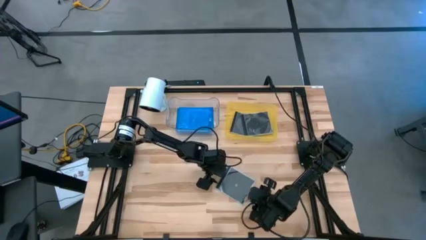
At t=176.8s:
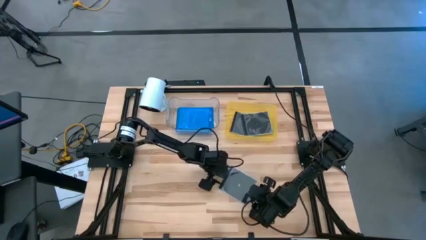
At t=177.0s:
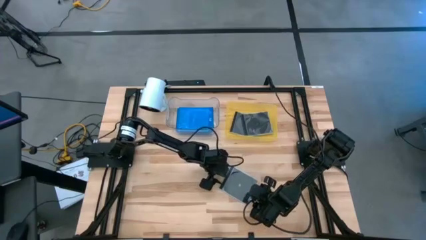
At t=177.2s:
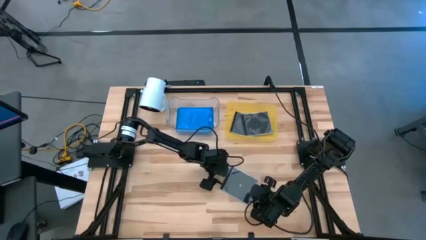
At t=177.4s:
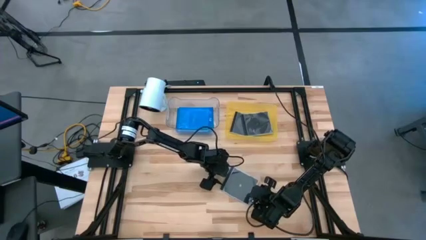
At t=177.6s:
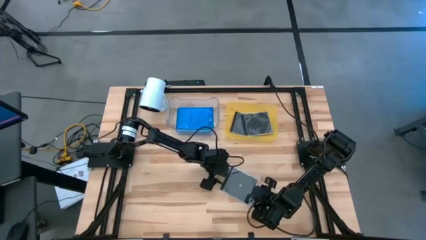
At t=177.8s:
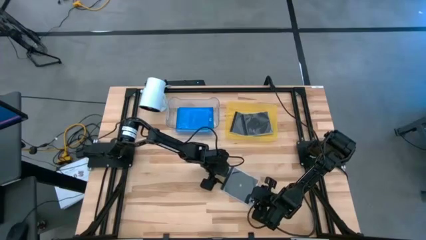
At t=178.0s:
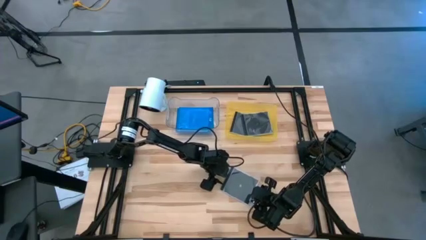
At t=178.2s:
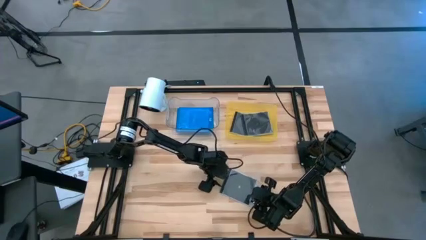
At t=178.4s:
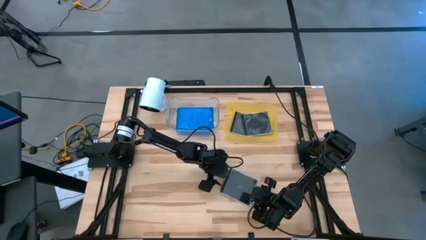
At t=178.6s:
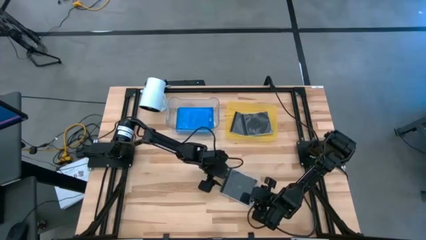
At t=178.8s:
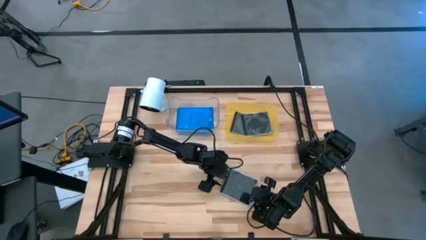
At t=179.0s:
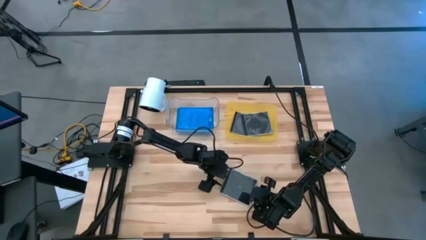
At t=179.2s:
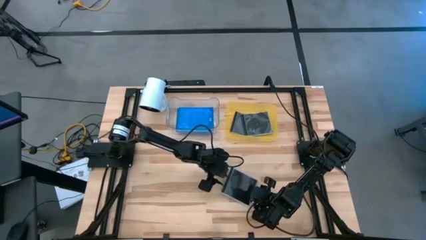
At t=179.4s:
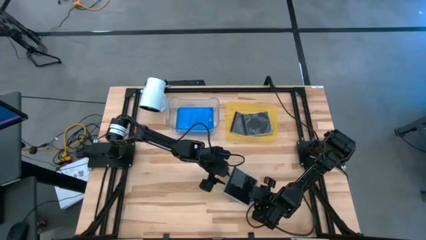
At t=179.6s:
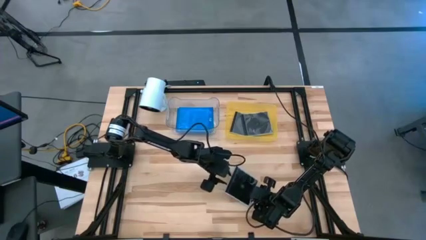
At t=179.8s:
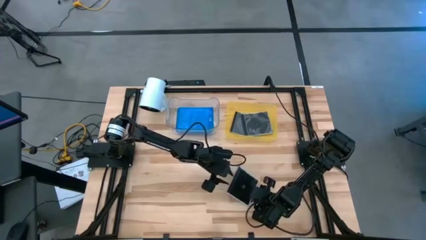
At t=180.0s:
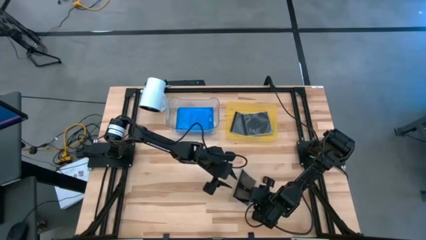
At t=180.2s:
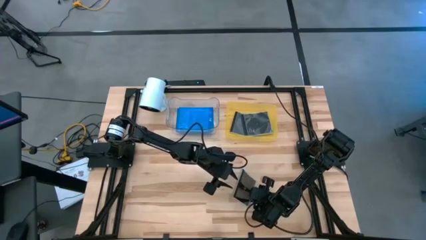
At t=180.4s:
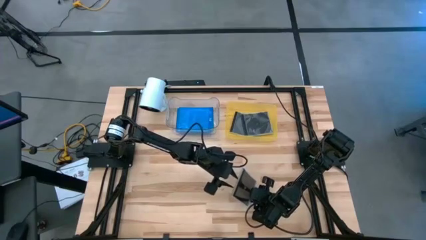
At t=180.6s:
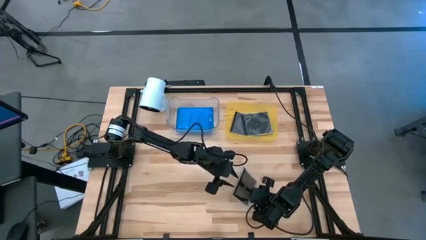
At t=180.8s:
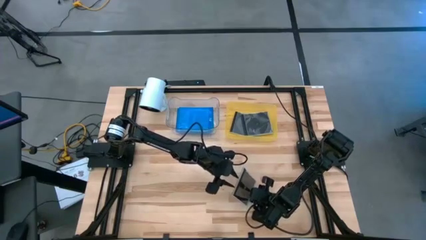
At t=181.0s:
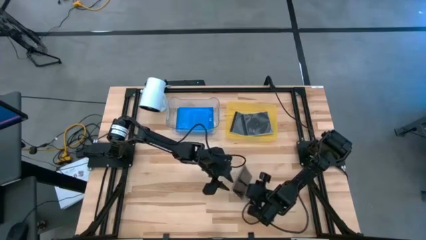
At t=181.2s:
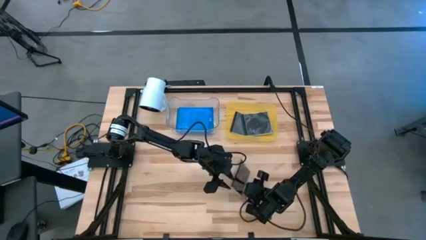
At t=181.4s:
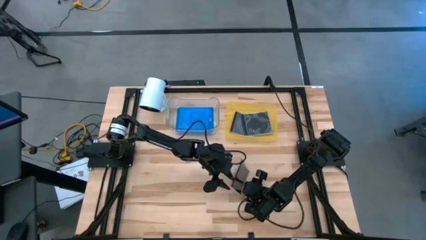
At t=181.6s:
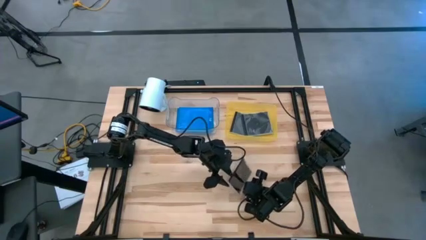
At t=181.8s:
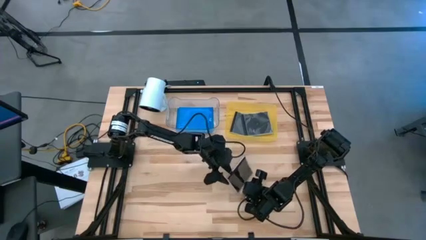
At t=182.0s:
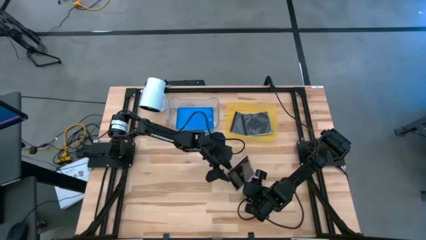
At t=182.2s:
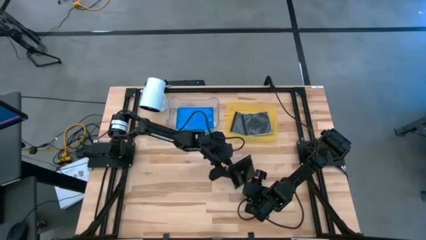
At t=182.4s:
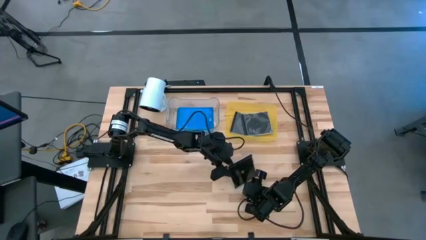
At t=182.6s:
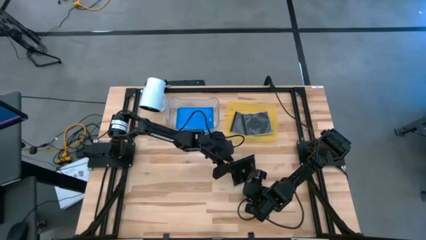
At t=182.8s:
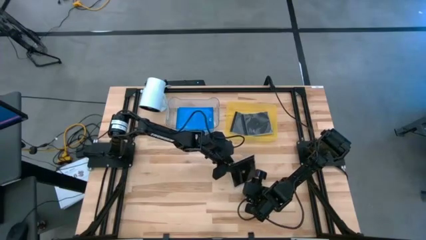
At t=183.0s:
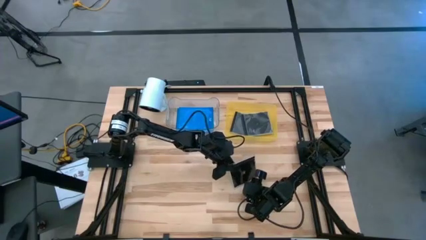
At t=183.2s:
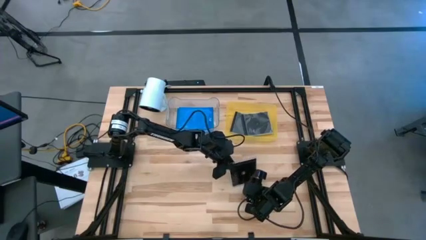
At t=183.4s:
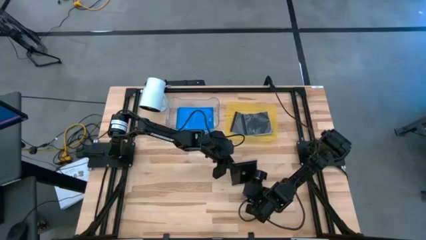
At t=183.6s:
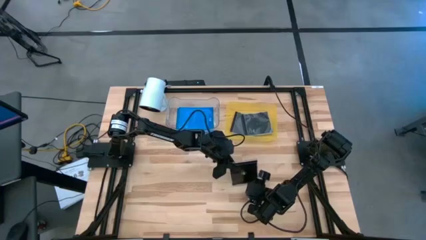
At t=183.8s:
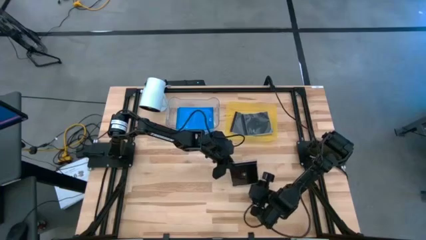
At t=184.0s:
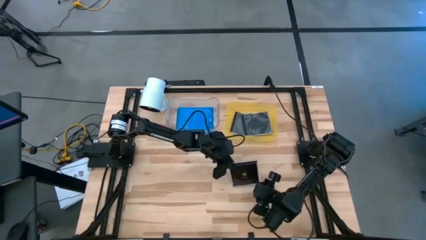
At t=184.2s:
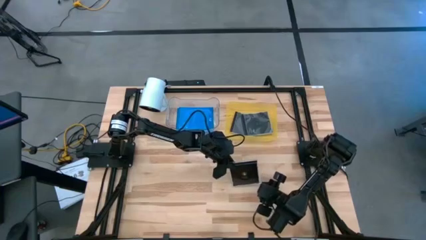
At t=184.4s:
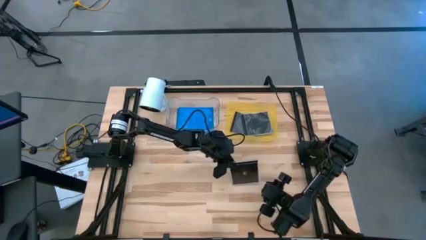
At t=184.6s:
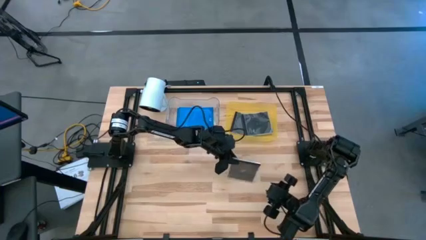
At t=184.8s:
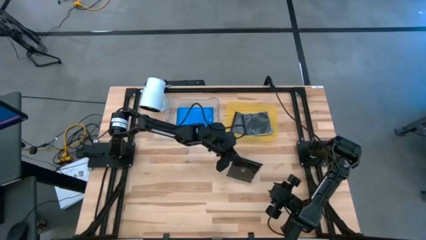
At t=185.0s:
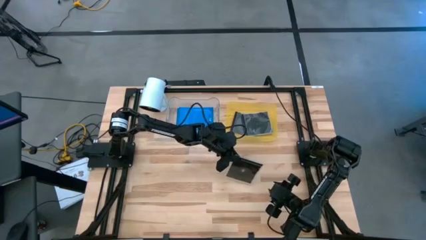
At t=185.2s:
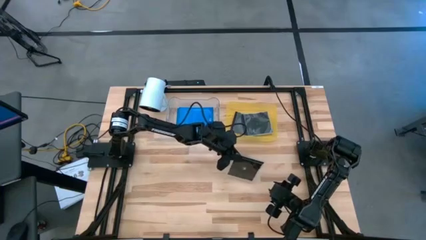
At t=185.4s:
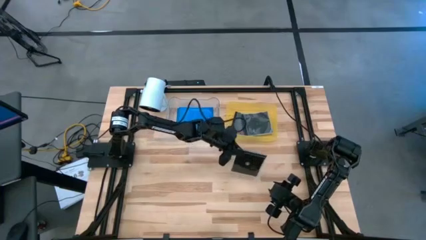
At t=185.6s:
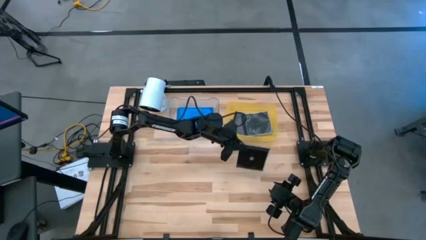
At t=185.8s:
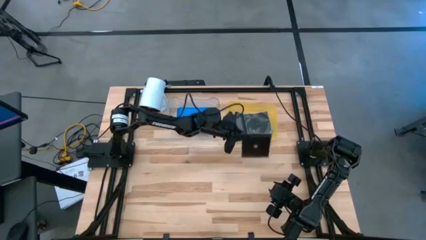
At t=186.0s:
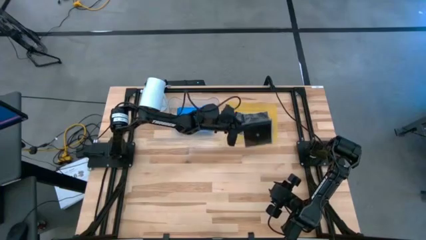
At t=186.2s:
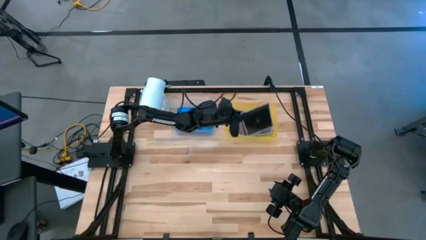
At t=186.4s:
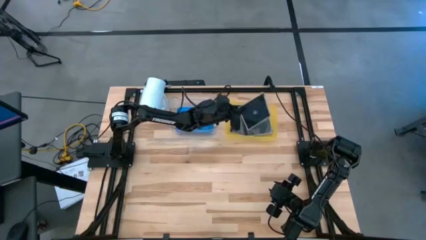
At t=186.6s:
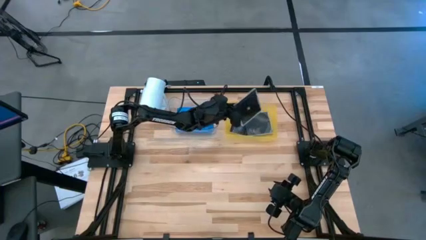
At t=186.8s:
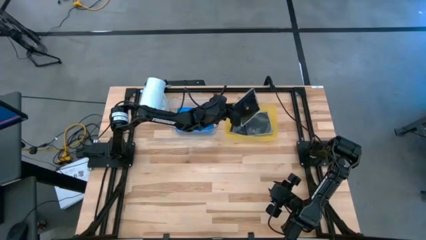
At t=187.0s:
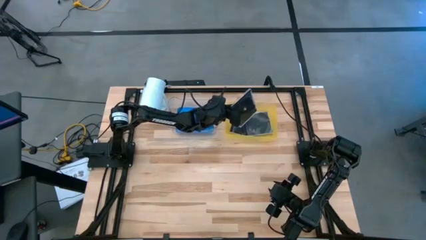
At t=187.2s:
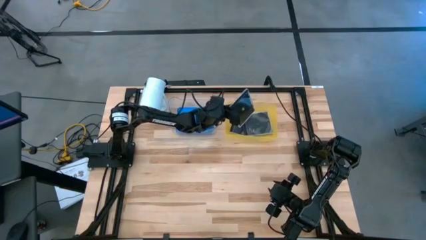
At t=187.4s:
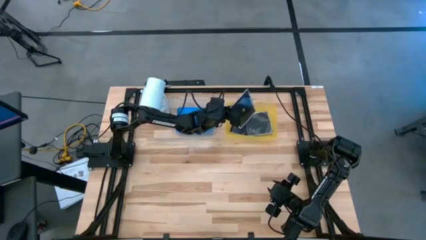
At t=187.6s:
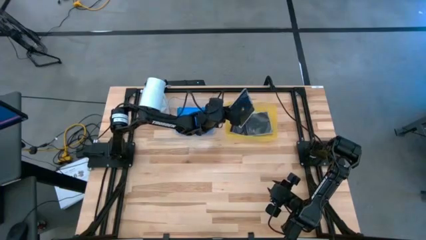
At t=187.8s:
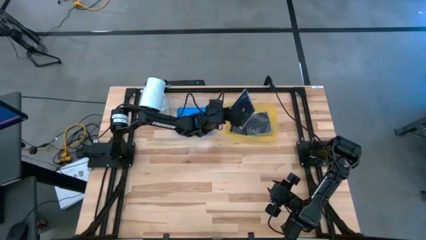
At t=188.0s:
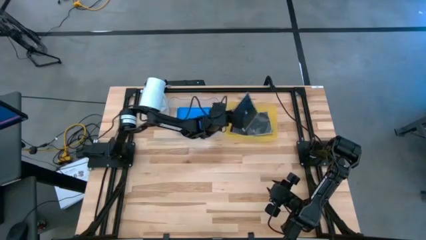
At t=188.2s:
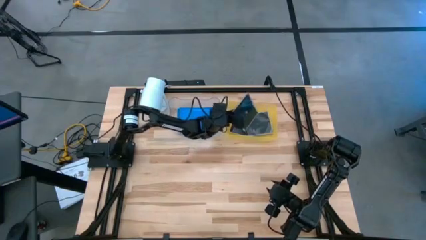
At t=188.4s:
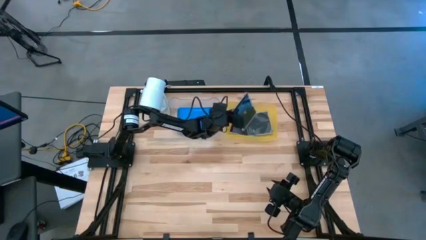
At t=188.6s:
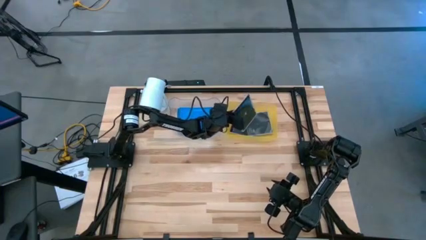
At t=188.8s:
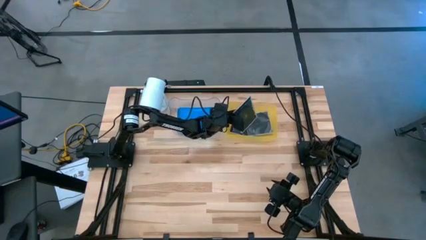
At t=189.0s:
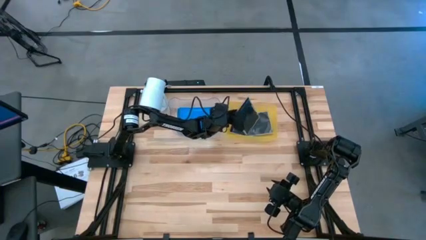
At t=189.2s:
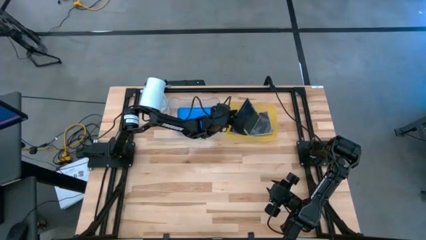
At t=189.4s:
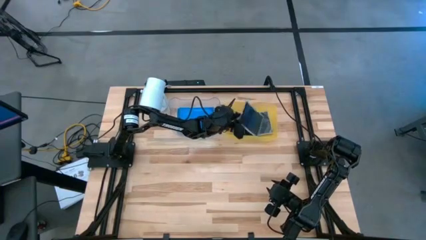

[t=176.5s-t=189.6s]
Task: Pick & place jewel cases by type
Put the black CD case into the yellow bin
